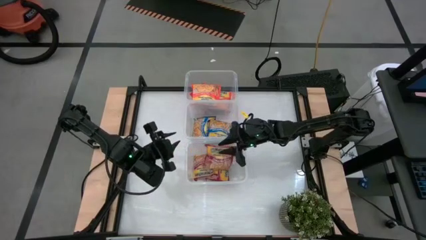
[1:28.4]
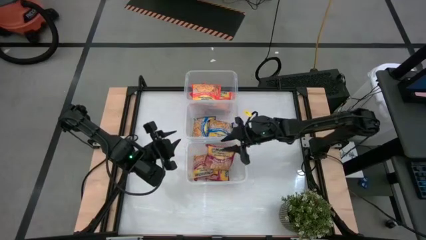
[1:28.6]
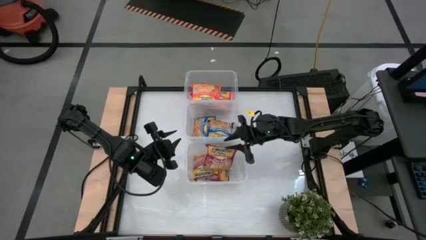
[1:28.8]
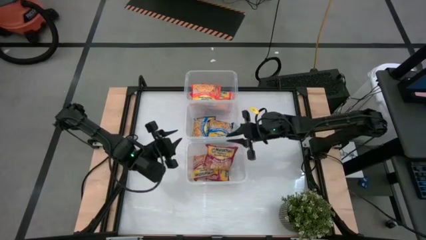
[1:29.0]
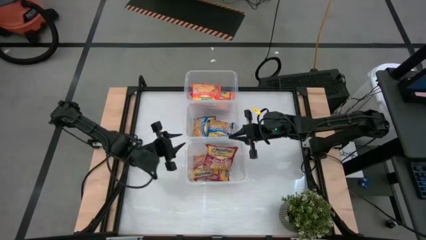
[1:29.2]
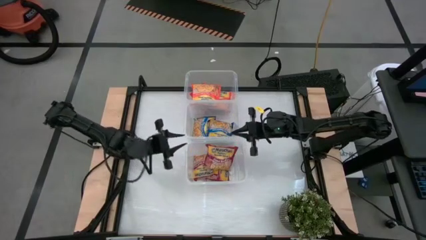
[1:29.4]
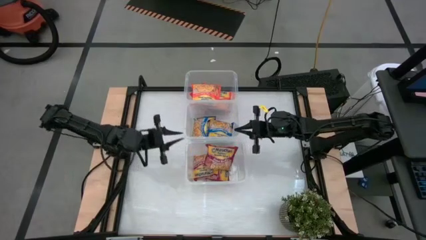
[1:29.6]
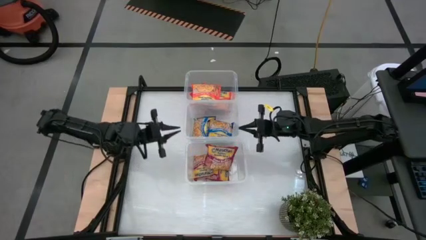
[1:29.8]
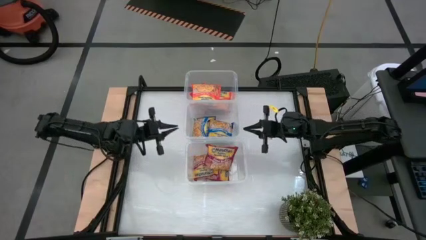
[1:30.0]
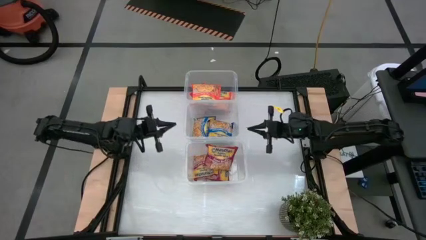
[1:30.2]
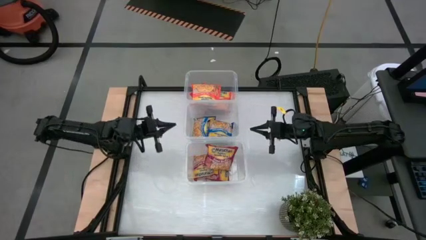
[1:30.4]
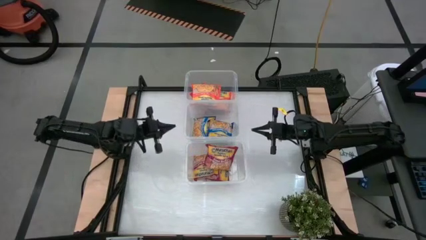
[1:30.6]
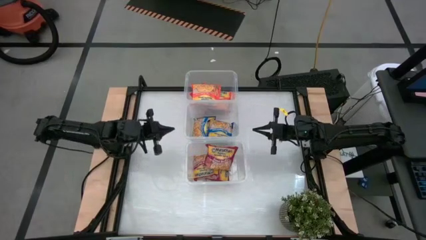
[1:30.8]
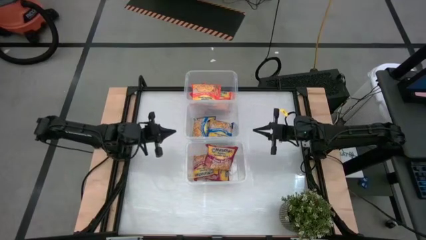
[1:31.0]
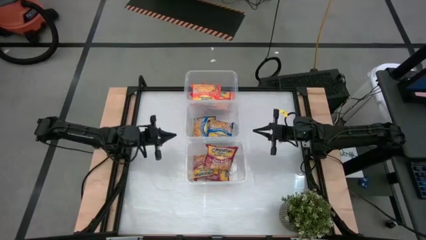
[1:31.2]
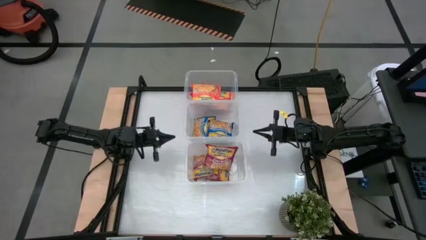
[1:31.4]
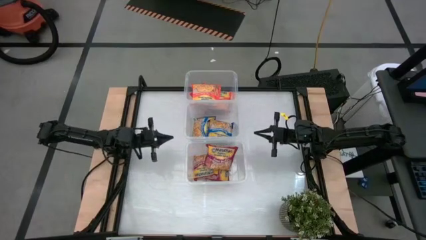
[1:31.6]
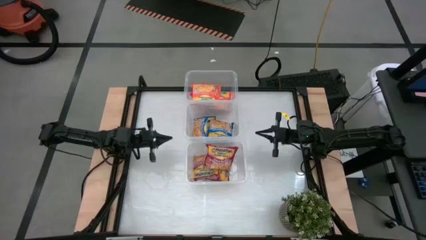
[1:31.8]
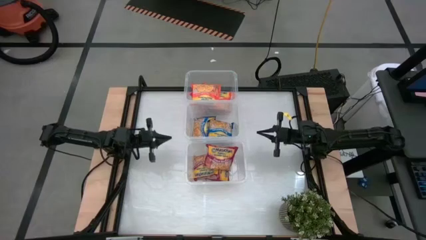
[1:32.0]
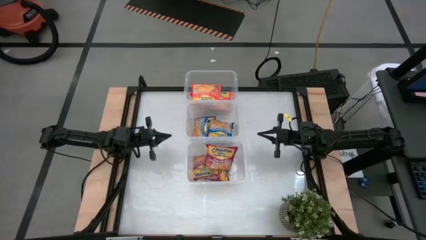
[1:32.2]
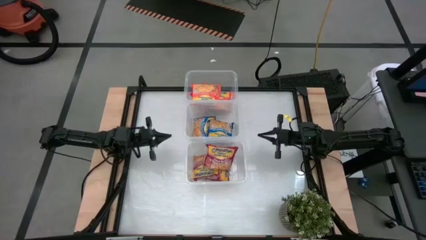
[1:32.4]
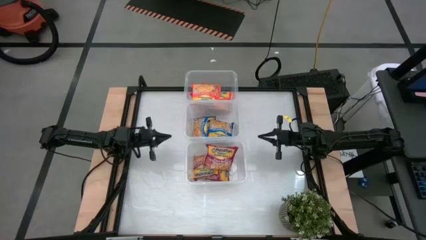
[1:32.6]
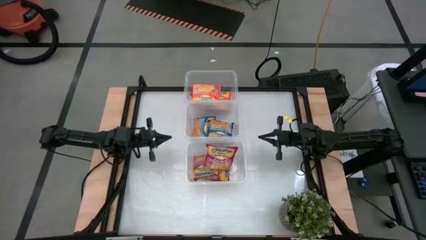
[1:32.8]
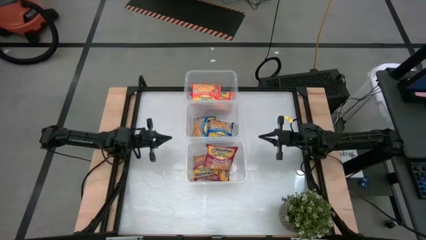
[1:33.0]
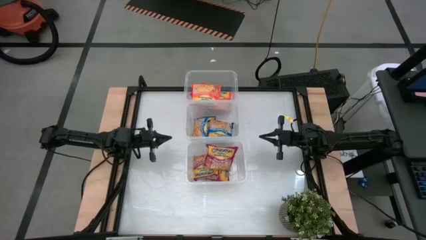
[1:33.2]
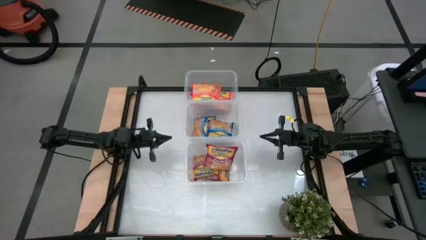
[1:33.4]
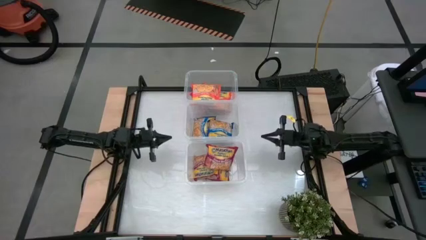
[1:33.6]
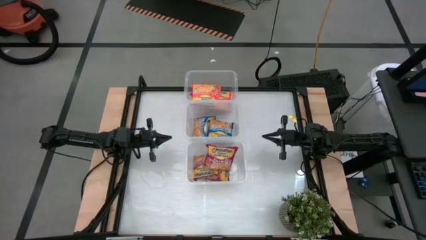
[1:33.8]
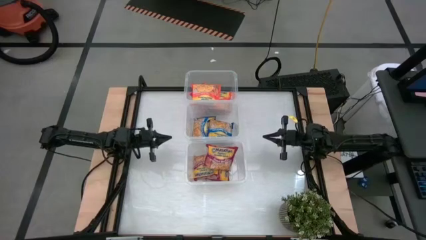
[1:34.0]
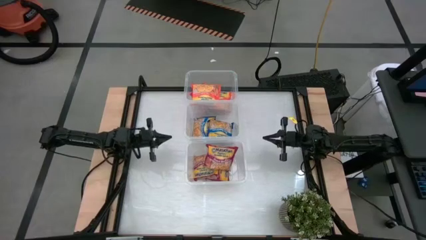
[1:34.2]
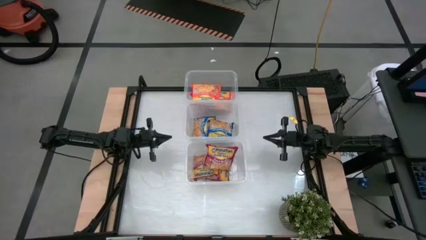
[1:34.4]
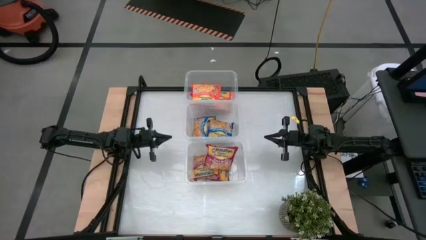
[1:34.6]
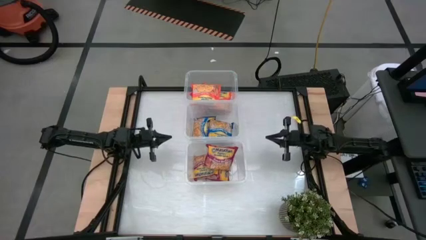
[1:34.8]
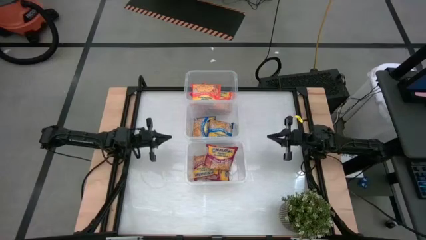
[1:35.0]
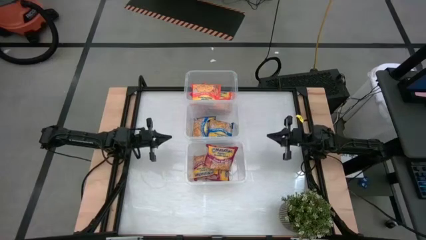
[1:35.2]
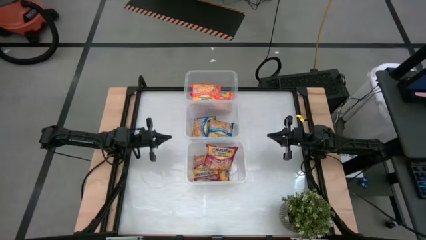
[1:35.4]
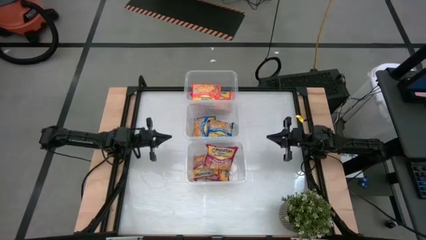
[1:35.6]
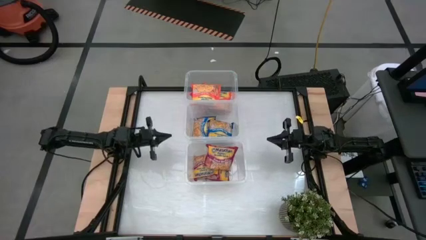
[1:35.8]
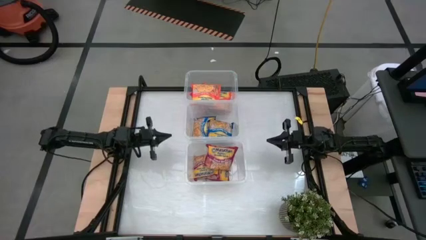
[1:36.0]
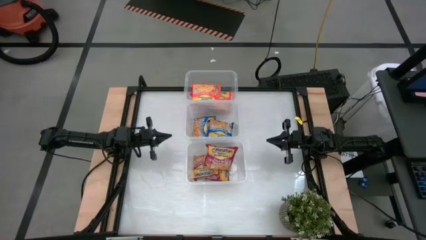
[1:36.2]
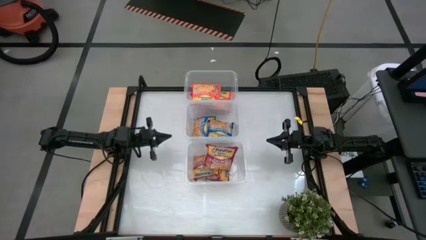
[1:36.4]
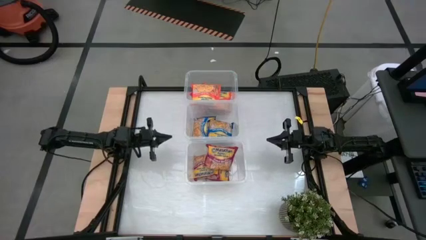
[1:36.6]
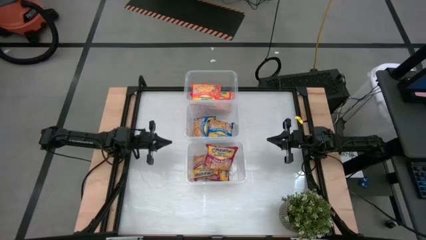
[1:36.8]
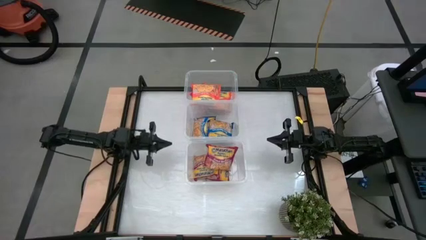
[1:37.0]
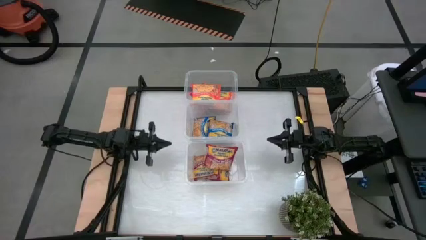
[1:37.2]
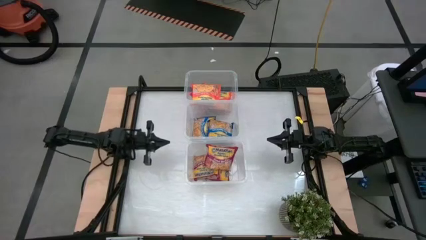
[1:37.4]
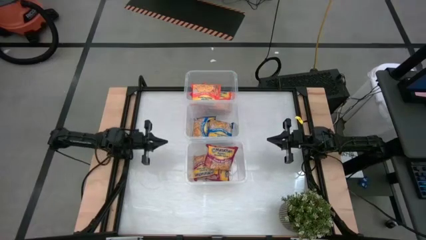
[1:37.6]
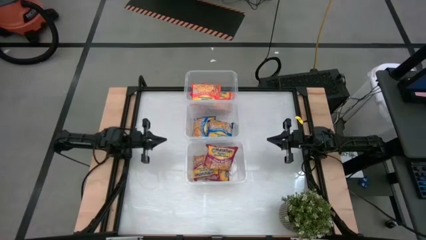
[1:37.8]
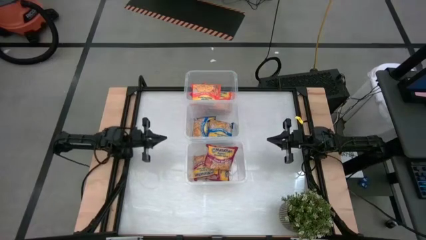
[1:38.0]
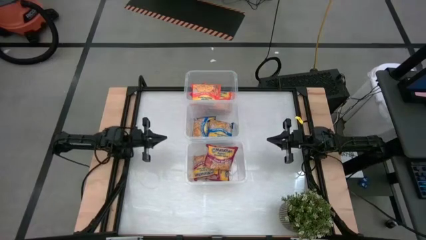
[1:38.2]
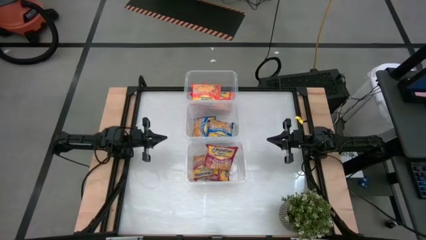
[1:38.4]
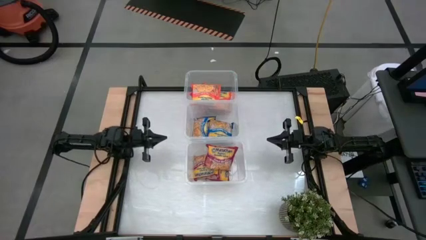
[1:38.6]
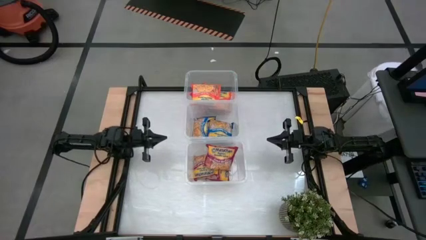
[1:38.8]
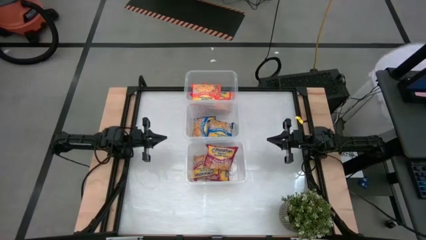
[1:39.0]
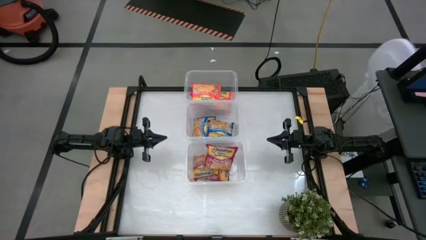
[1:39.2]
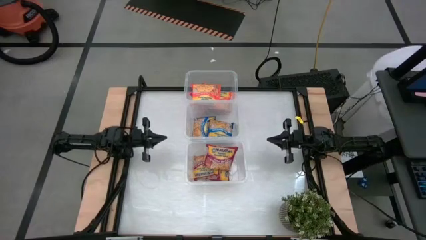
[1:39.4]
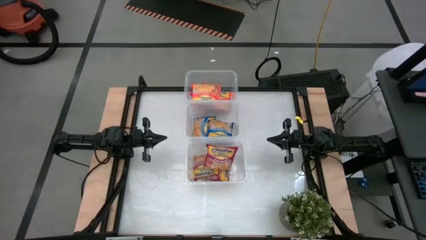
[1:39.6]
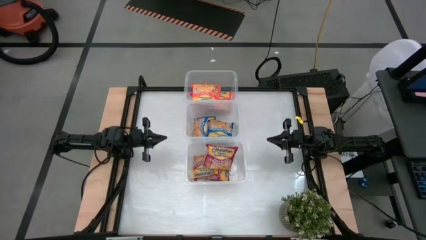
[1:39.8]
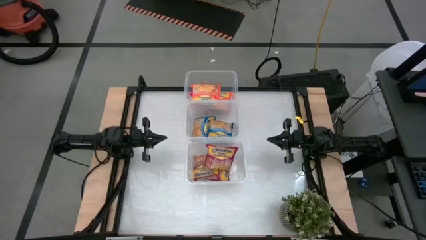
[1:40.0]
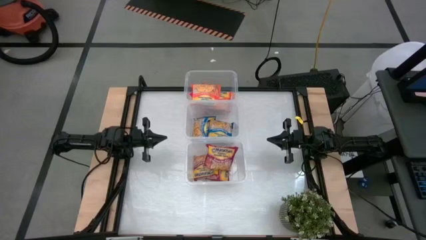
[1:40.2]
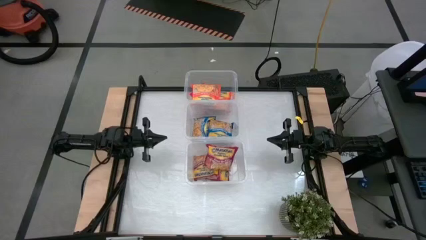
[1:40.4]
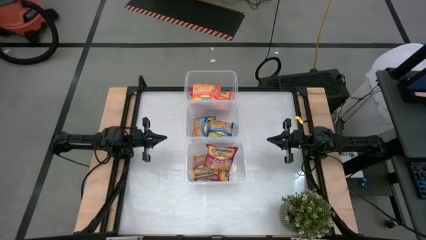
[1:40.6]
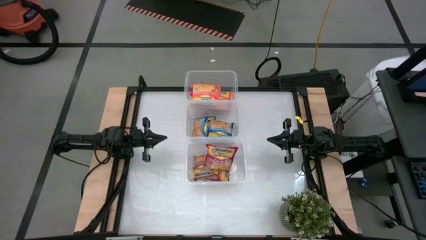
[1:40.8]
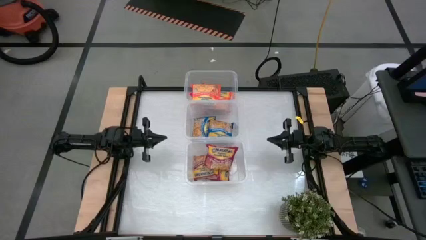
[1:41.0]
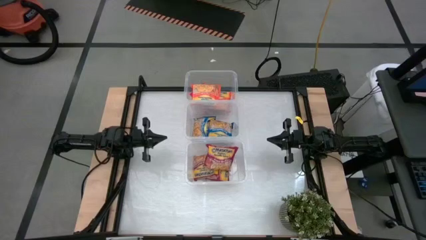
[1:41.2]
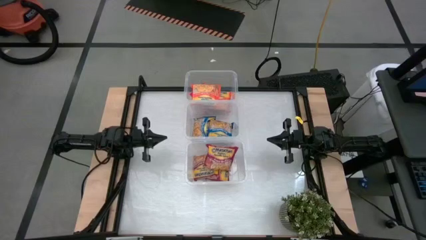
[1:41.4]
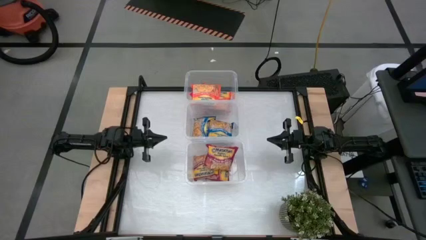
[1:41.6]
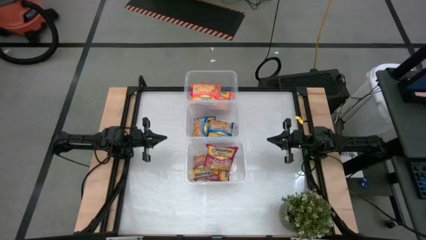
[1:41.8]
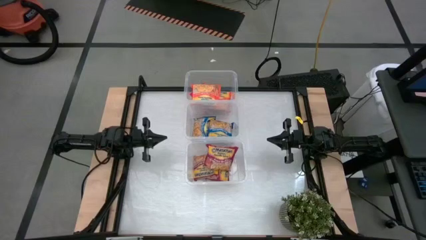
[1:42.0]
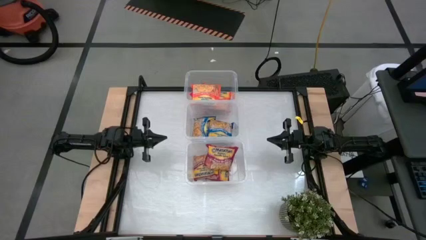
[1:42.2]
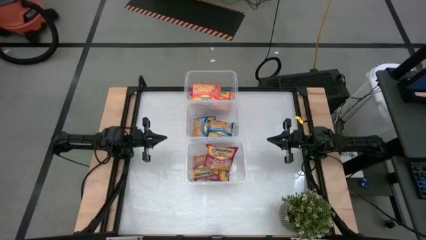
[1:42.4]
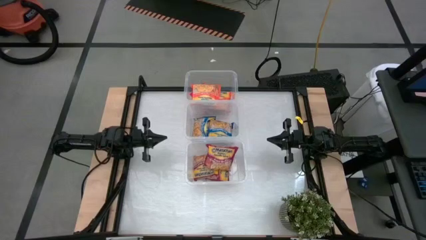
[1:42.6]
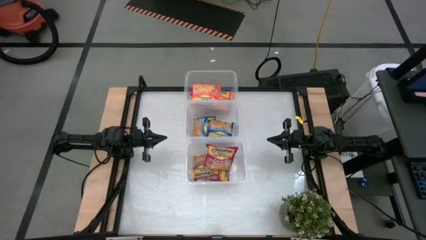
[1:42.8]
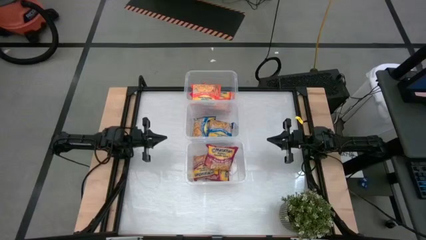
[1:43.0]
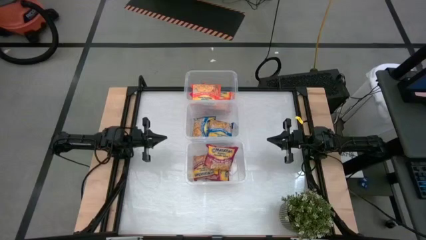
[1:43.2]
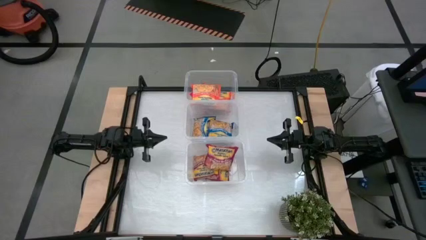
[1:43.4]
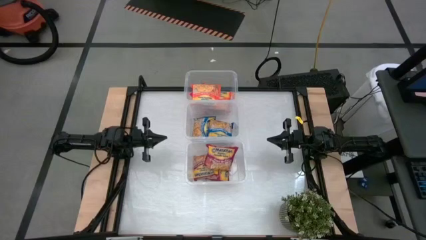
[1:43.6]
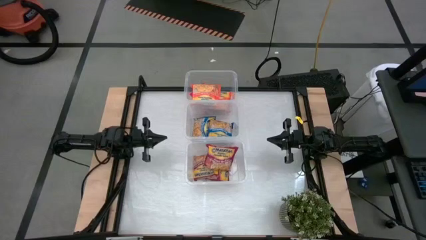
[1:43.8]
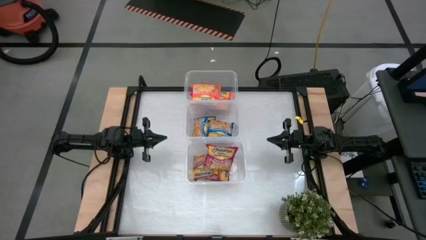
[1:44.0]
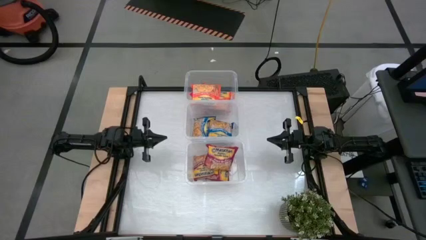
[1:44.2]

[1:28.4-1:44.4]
Task: Sort Maruchan noodles
Return to Home Position

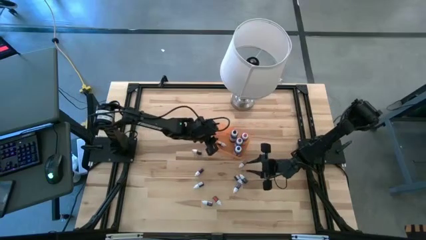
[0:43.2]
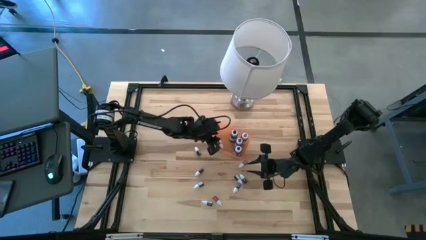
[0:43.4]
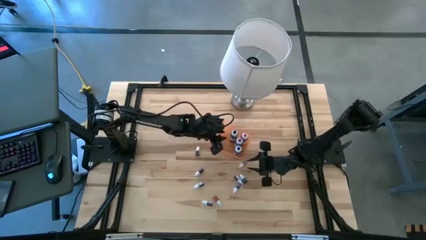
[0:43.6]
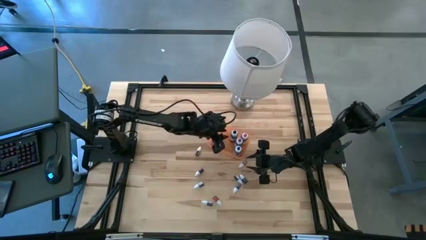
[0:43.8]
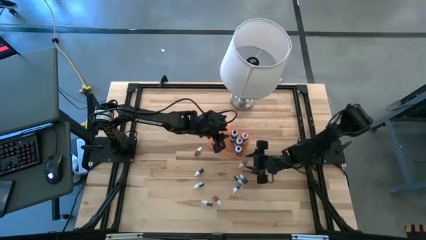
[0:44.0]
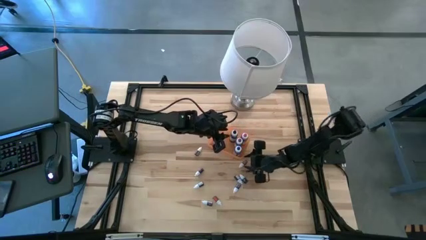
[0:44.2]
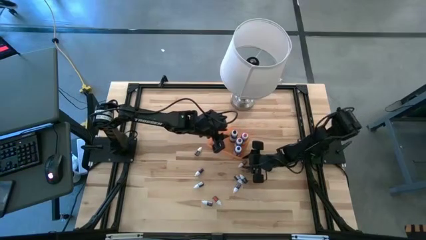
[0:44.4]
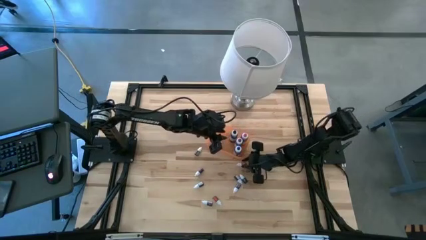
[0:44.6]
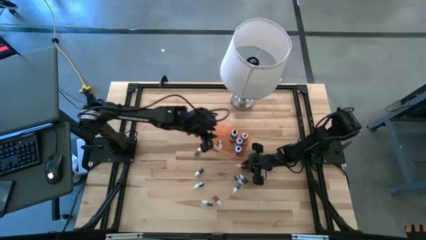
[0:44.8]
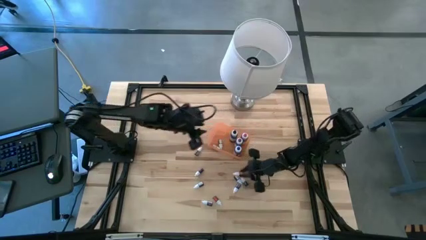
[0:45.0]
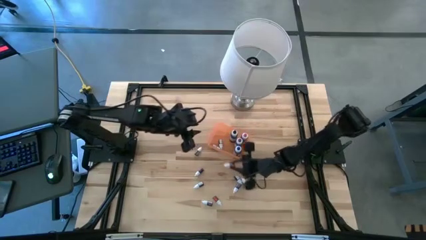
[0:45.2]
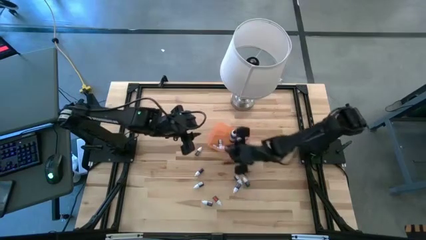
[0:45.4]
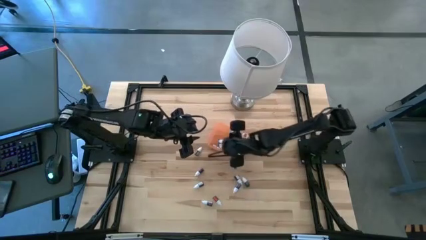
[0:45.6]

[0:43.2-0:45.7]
Task: Pick & Place food coloring
Put the small orange food coloring bottle into the orange bin
